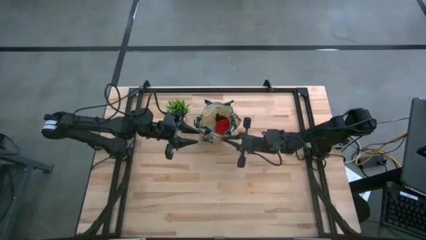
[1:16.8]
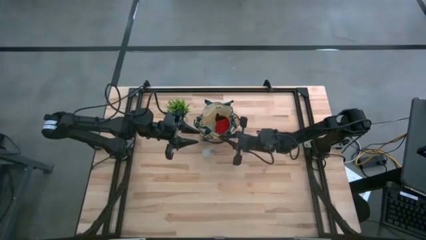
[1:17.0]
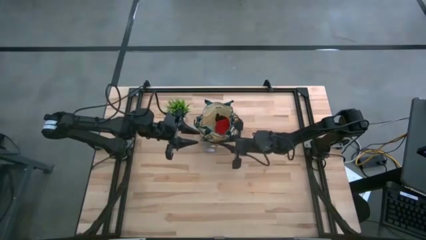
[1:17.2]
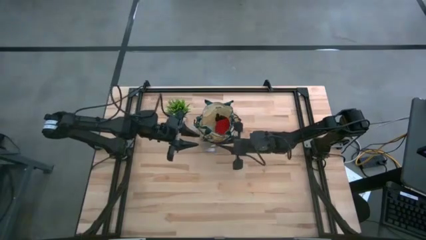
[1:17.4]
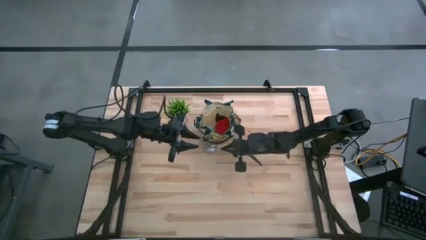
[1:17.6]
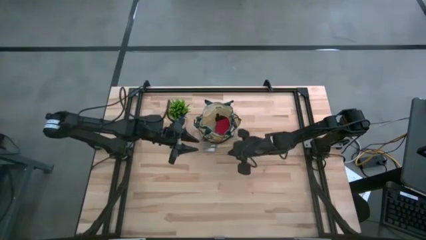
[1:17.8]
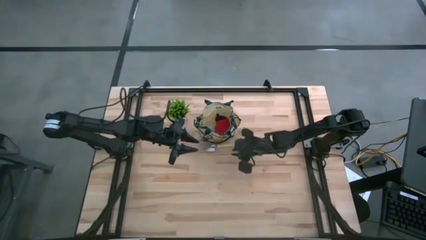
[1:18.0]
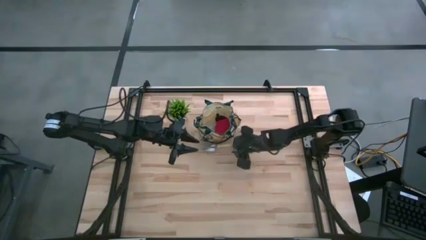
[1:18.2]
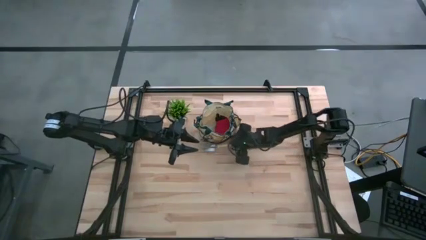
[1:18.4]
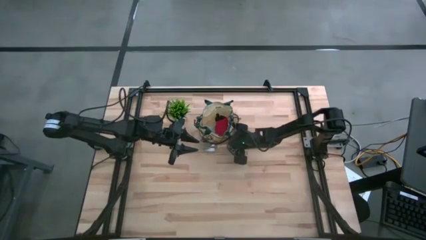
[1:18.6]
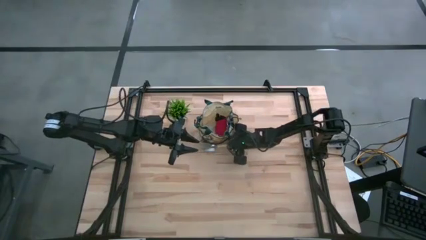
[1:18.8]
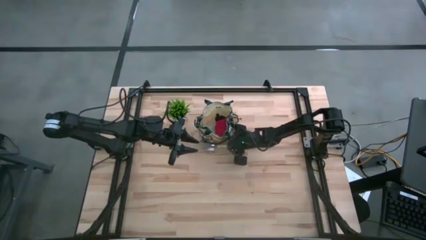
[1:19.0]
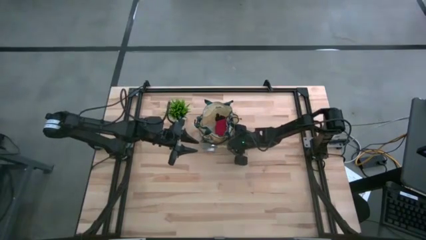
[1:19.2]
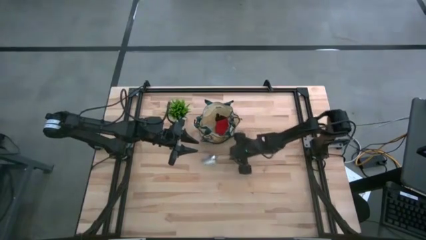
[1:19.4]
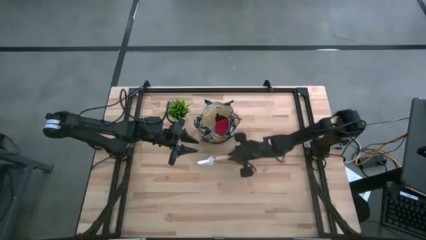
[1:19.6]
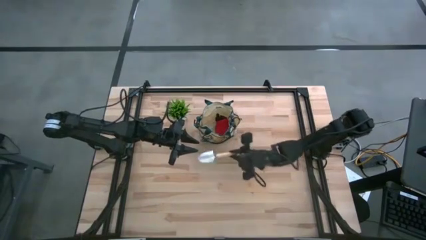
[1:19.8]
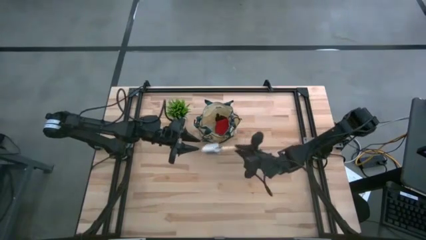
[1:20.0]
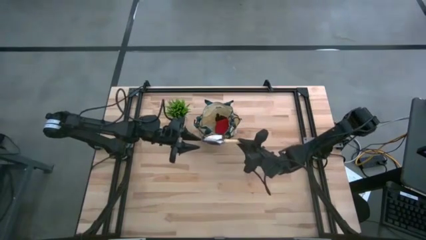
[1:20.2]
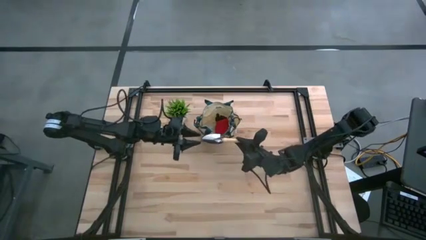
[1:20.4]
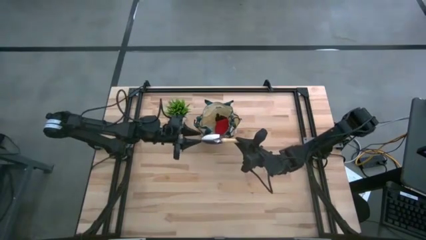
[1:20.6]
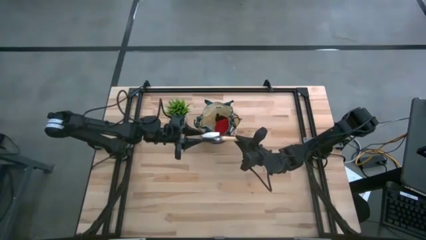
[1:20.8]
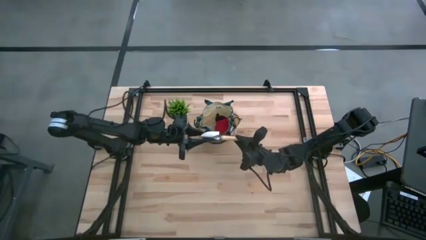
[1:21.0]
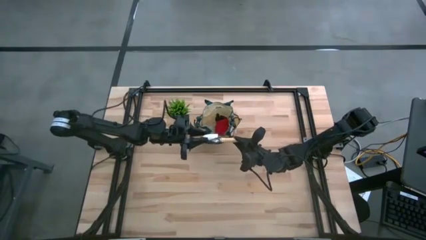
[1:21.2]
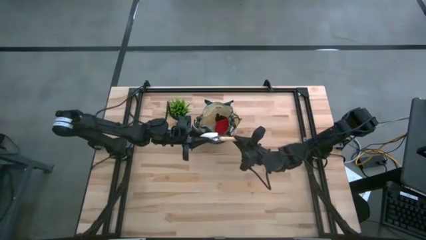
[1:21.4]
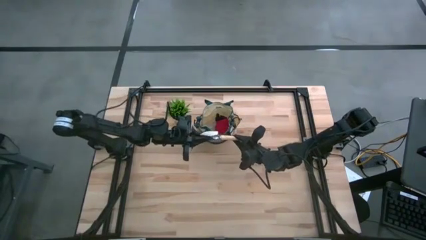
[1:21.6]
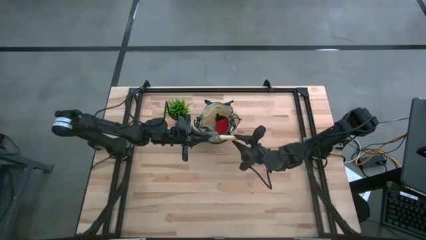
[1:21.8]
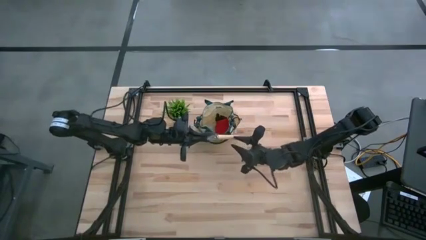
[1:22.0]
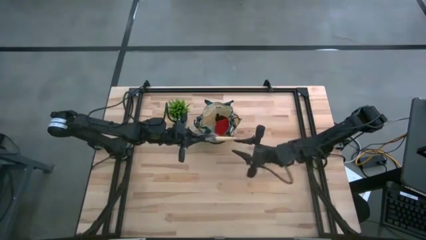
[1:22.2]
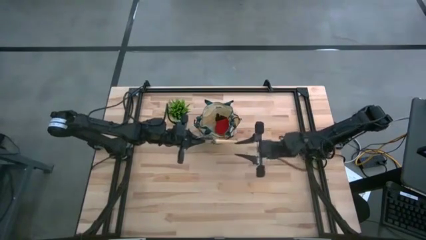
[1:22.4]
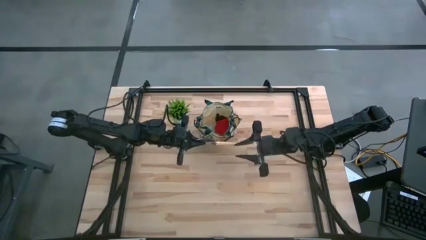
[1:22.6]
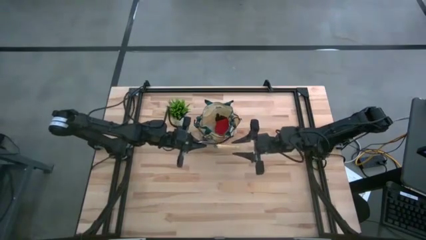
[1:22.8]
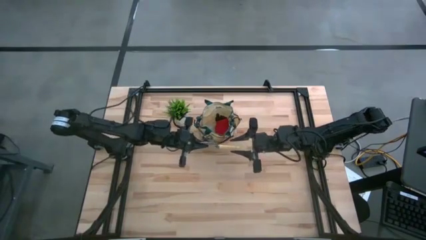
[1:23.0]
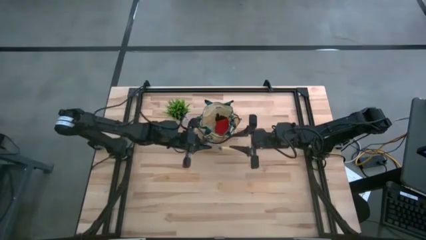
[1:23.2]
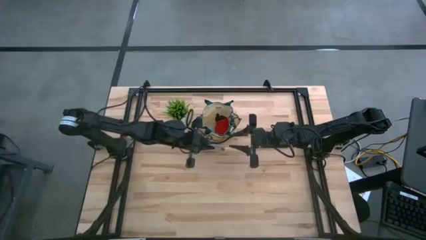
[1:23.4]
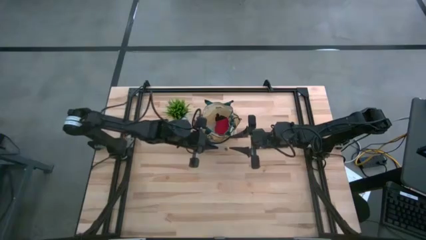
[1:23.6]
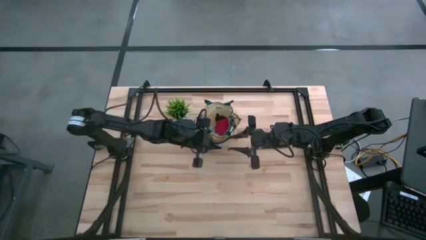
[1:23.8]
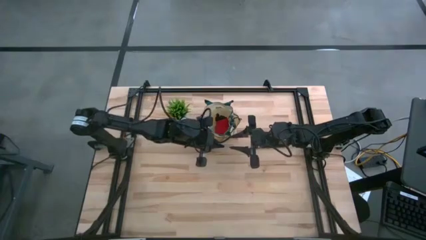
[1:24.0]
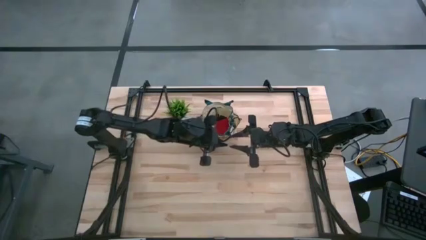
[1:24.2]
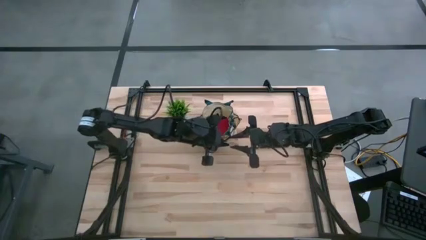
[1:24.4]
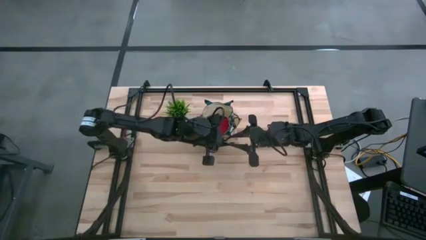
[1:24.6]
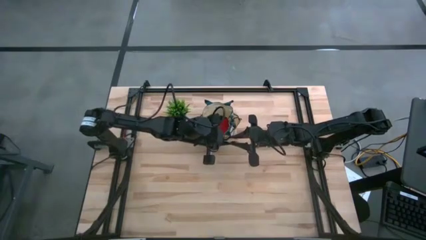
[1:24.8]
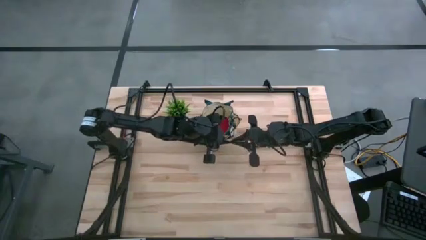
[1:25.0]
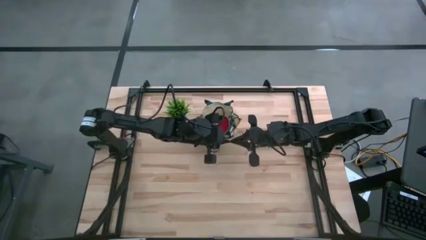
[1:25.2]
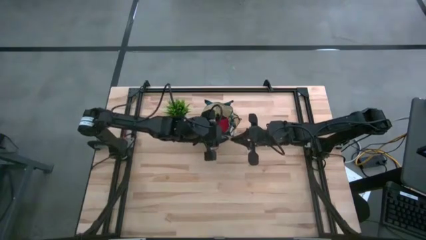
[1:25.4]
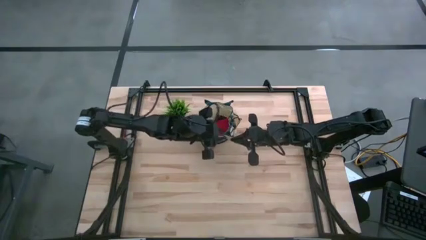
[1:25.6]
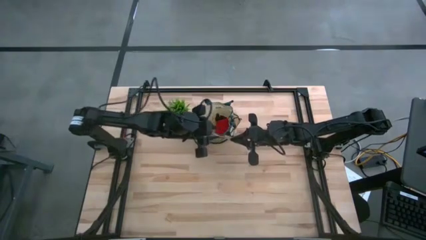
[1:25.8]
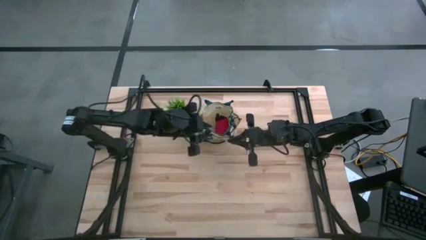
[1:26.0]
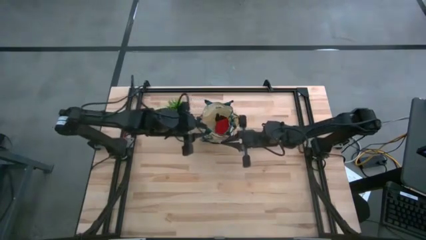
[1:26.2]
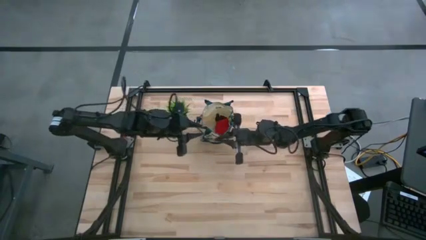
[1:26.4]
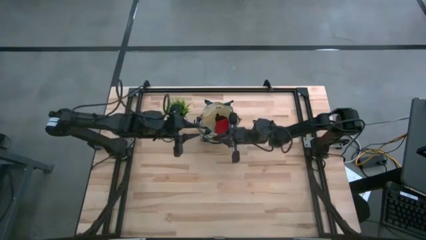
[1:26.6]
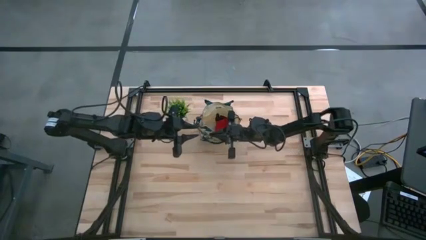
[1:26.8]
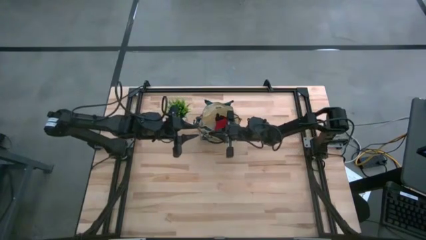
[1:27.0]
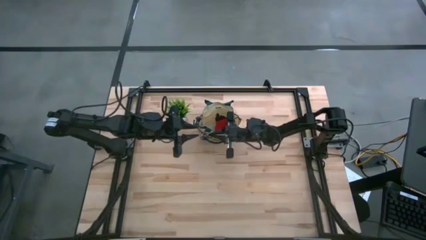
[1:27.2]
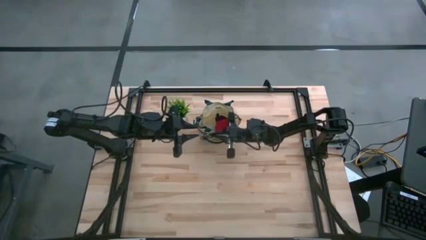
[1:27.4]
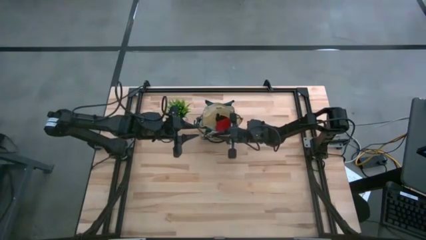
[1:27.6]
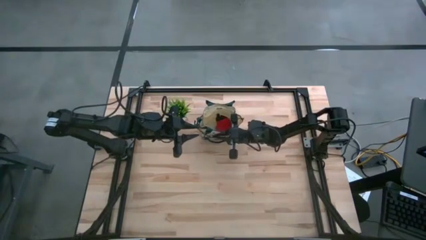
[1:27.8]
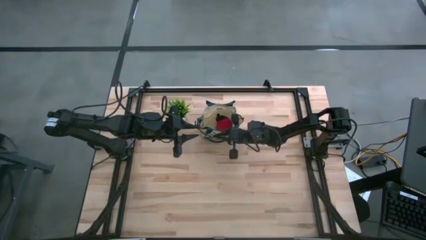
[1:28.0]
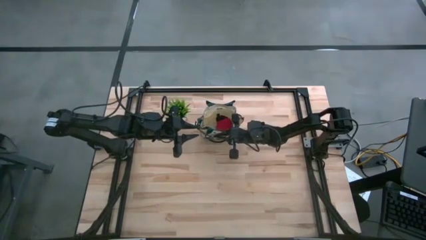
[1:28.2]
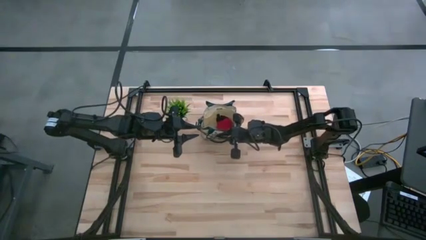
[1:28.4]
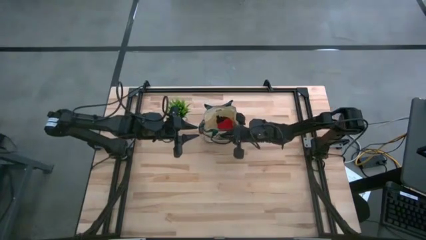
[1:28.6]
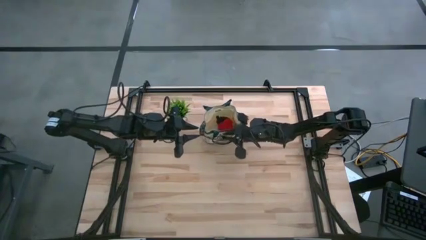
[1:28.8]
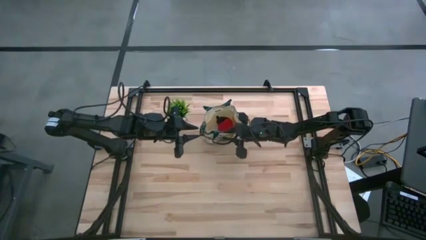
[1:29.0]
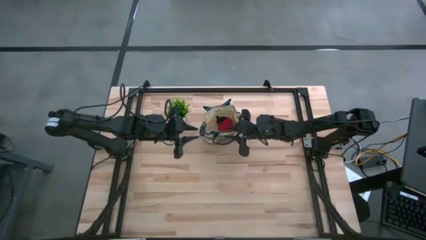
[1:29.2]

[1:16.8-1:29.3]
Task: Pick & Place Garden tools in Gardening bag
Put the brown trowel into the white gardening bag
